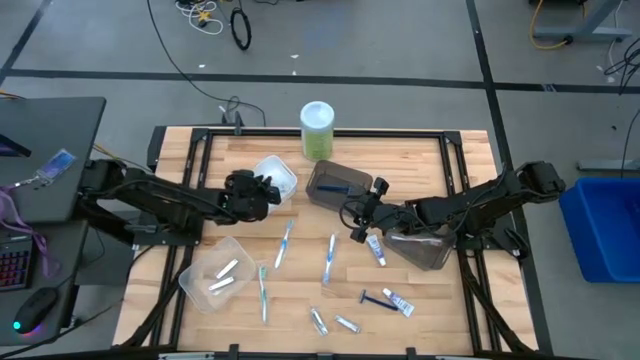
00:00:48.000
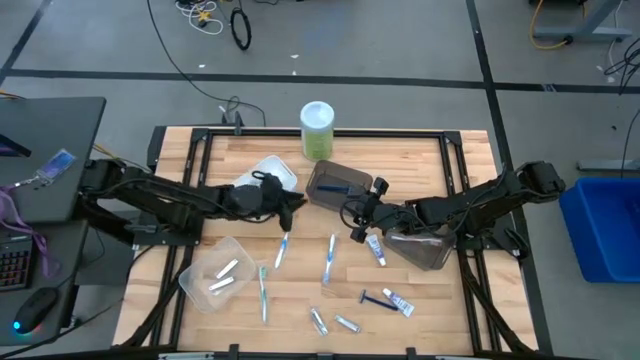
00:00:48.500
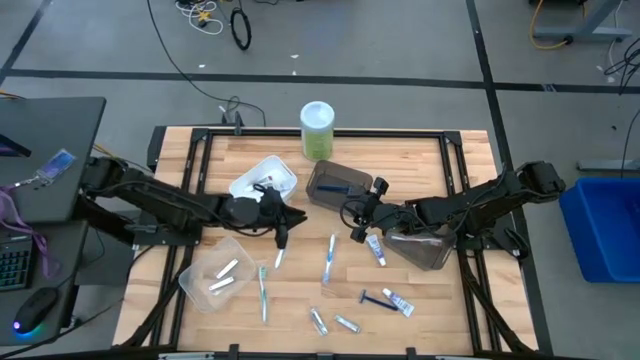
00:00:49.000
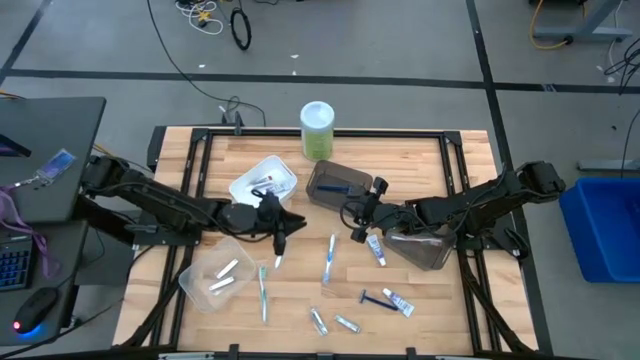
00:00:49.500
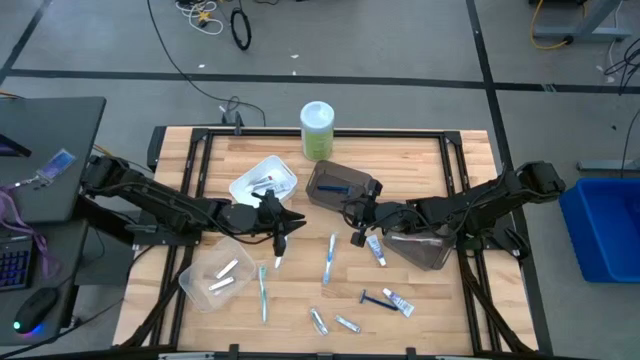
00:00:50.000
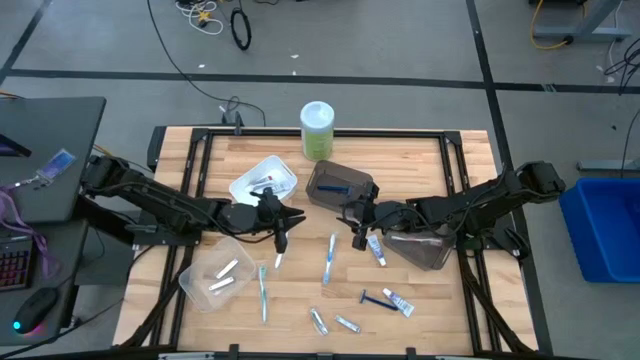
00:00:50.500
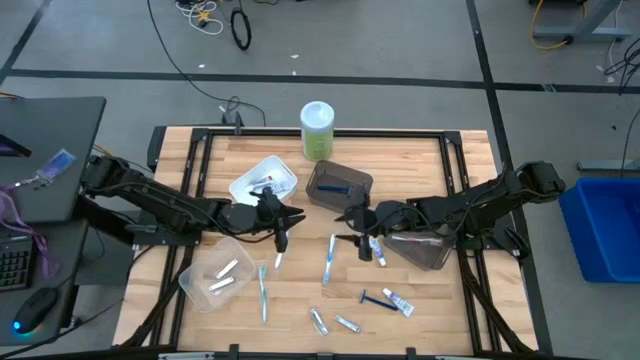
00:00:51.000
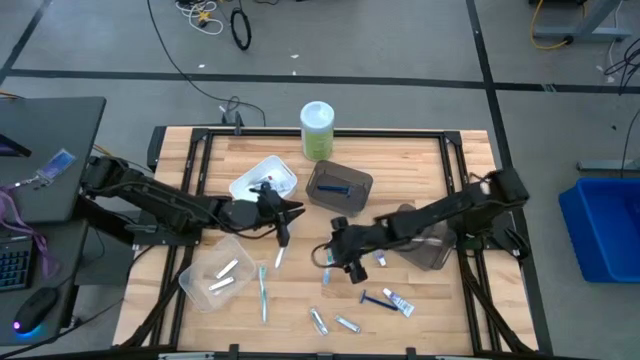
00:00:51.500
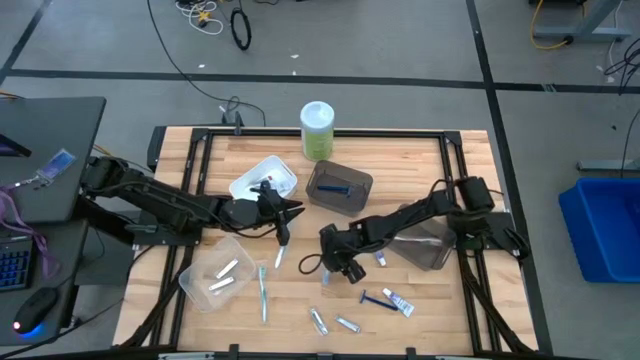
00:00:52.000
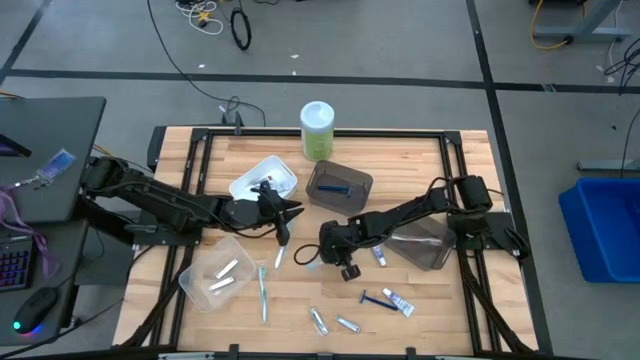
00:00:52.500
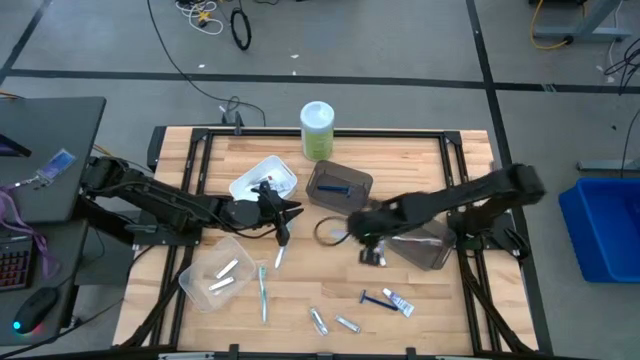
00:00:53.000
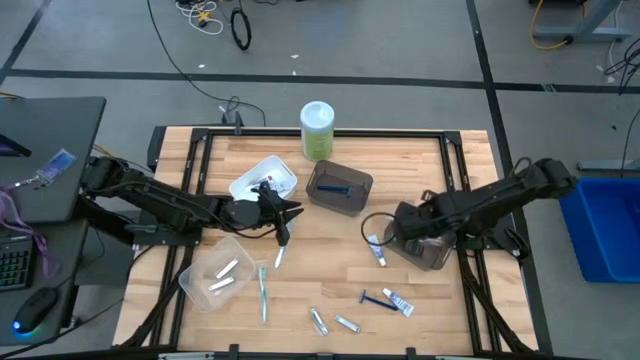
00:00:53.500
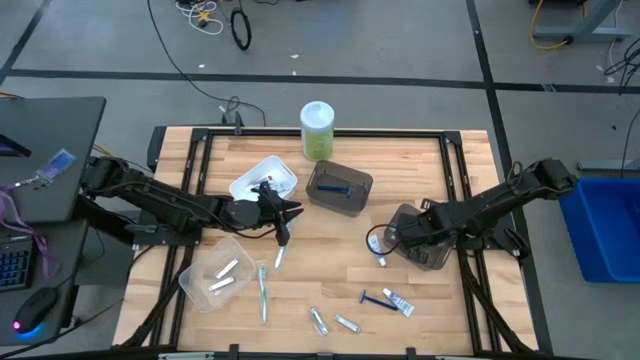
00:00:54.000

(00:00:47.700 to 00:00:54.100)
Task: Pick & Place Travel size toiletries
Put the blue toothbrush into the right black bin

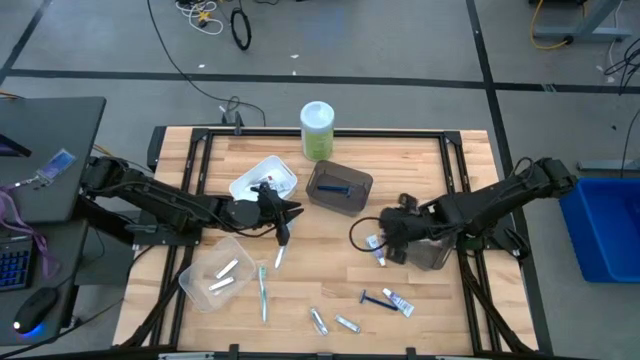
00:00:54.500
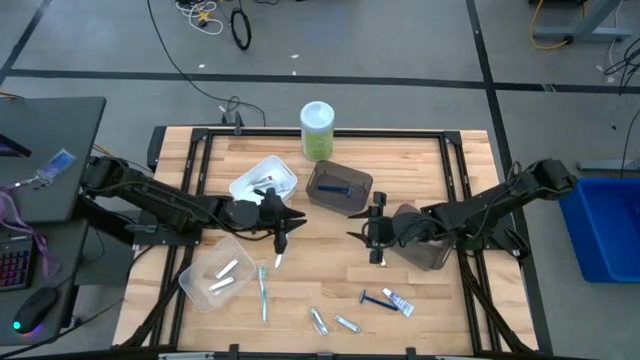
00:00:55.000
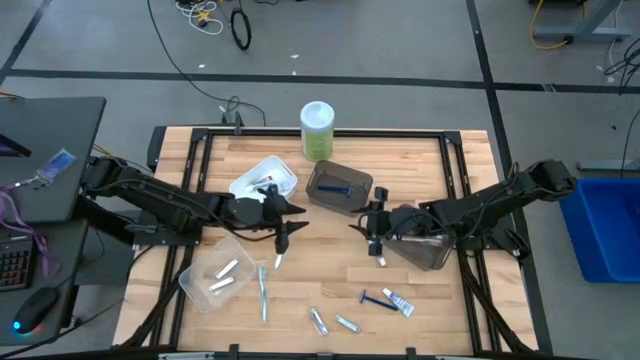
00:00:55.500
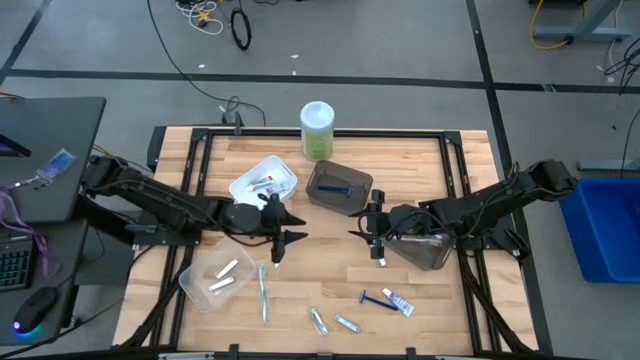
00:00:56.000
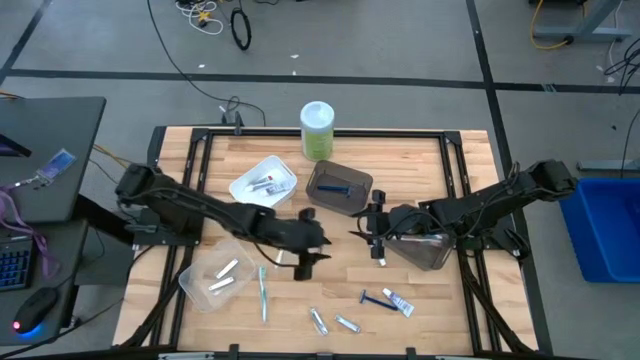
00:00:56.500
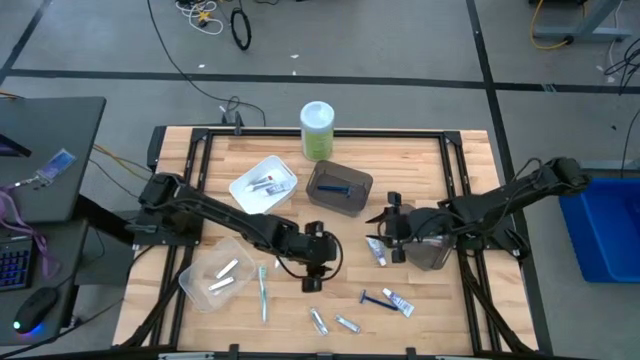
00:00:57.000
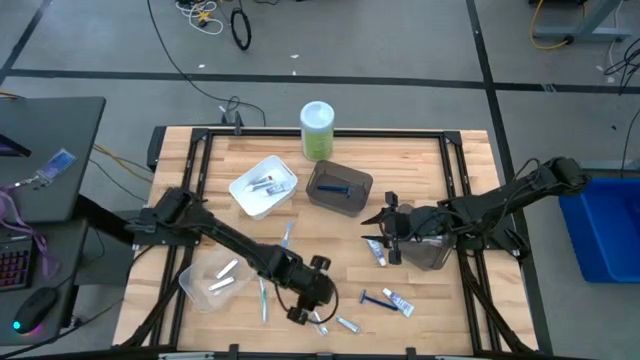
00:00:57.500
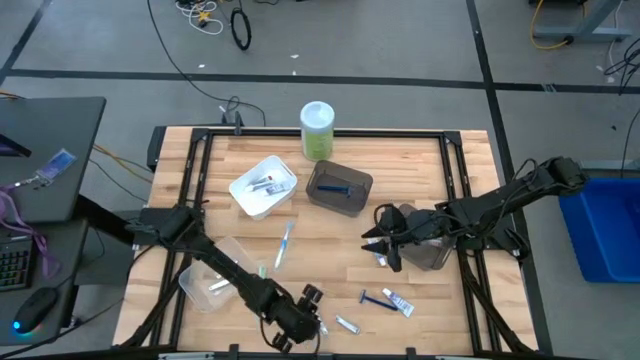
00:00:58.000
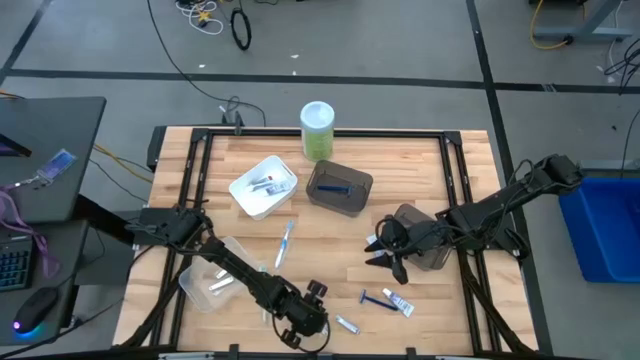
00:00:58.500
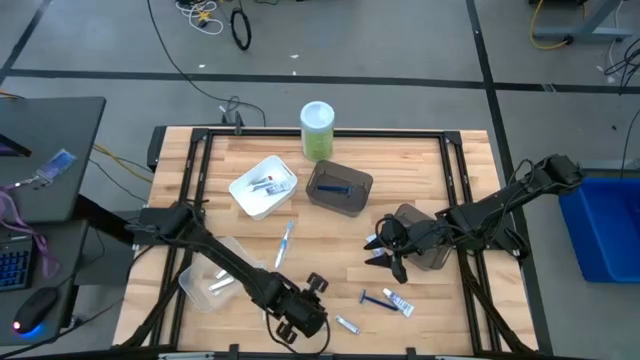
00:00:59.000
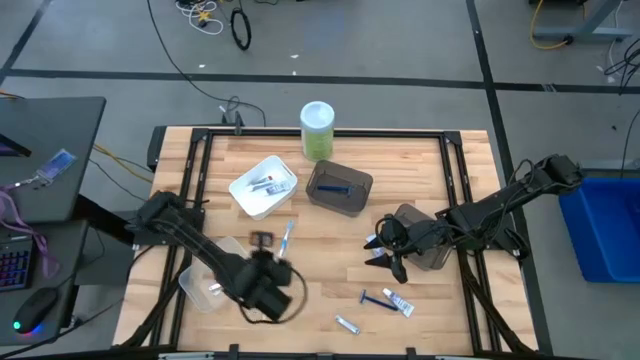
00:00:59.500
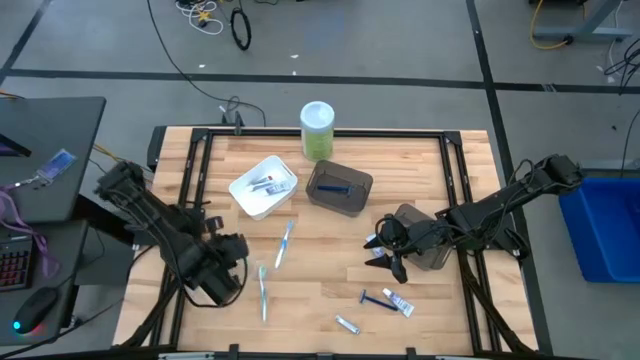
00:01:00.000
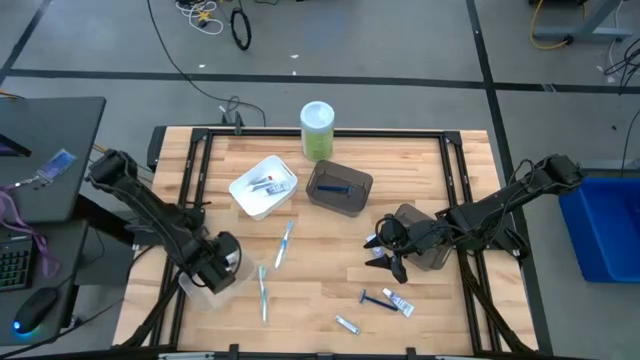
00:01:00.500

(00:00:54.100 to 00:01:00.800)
Put the nail cutter into the transparent bin

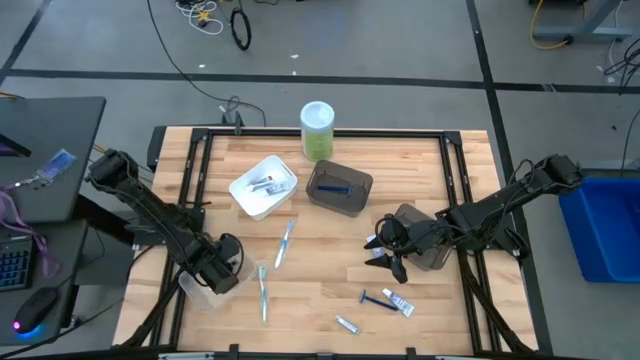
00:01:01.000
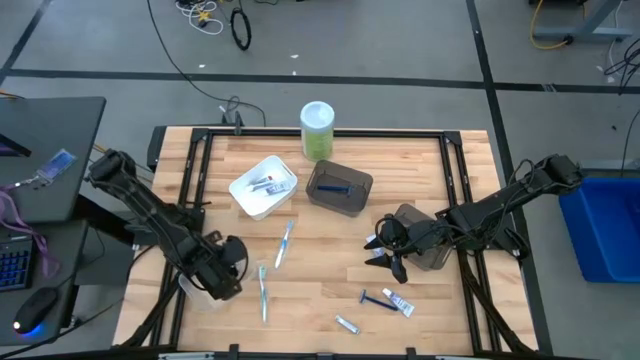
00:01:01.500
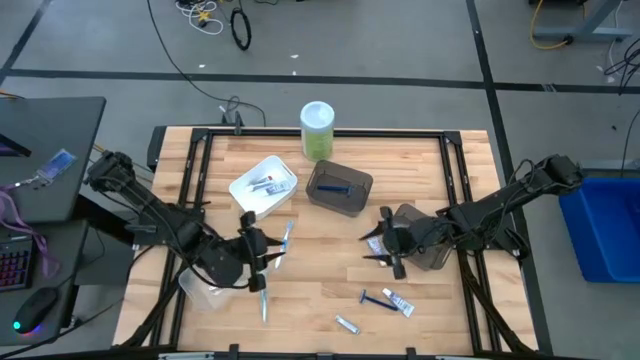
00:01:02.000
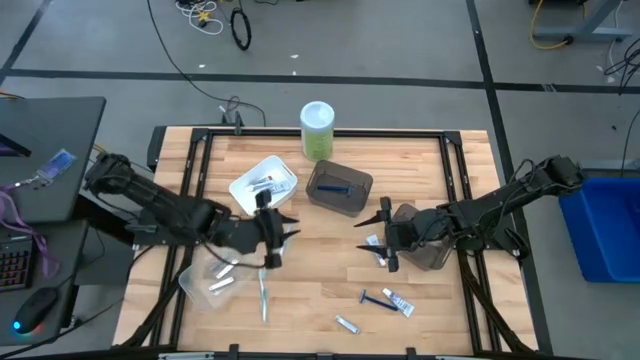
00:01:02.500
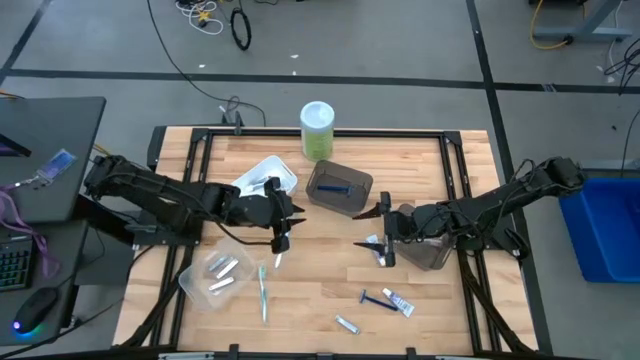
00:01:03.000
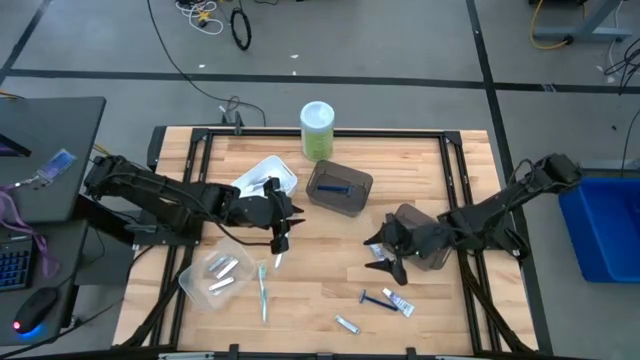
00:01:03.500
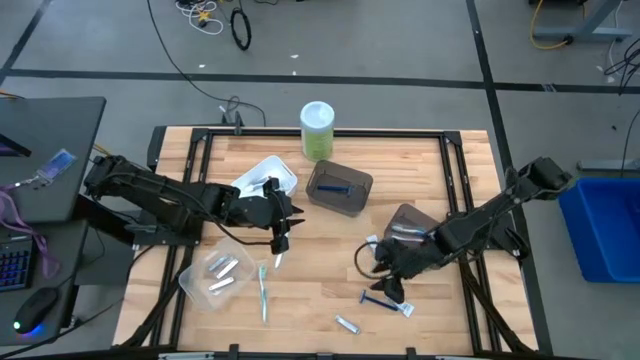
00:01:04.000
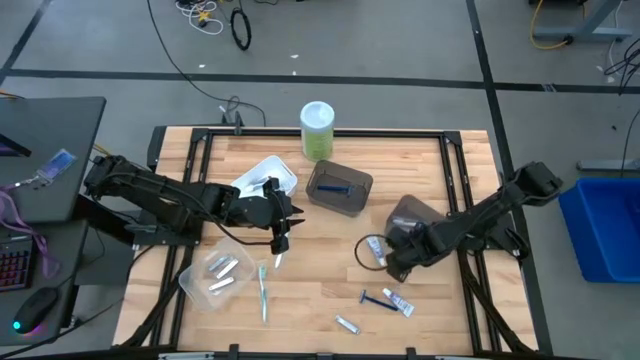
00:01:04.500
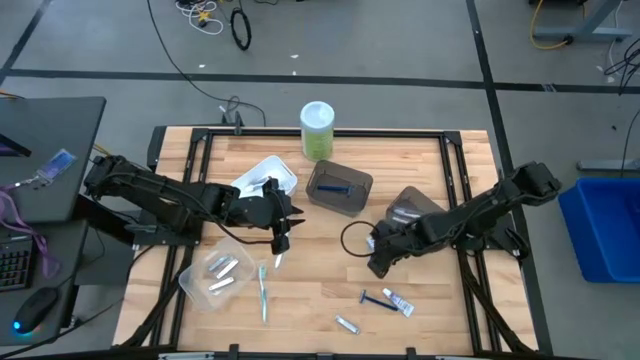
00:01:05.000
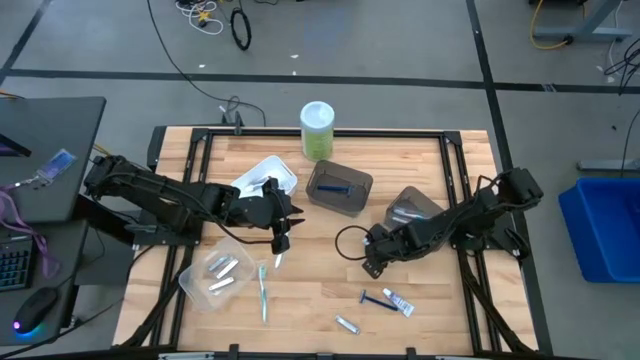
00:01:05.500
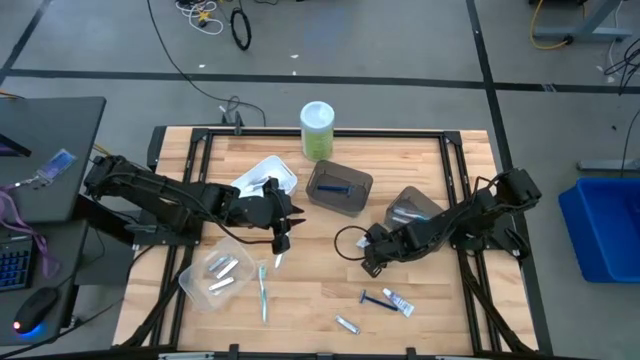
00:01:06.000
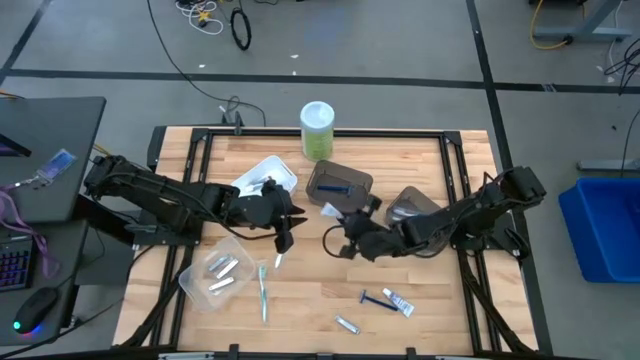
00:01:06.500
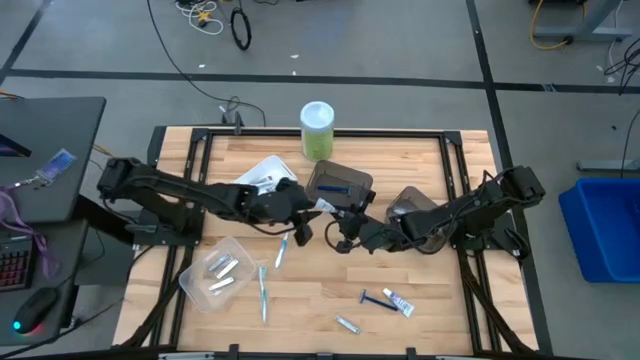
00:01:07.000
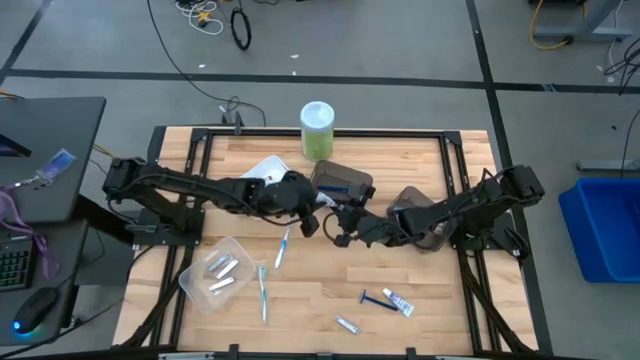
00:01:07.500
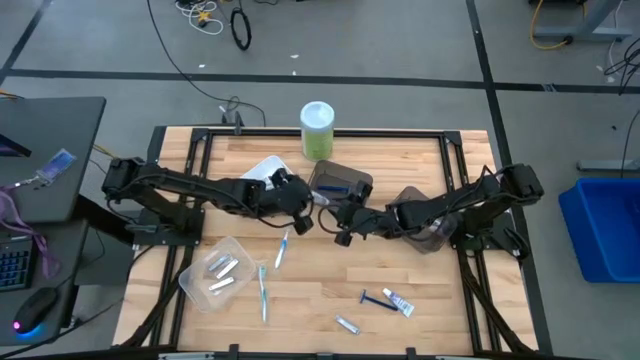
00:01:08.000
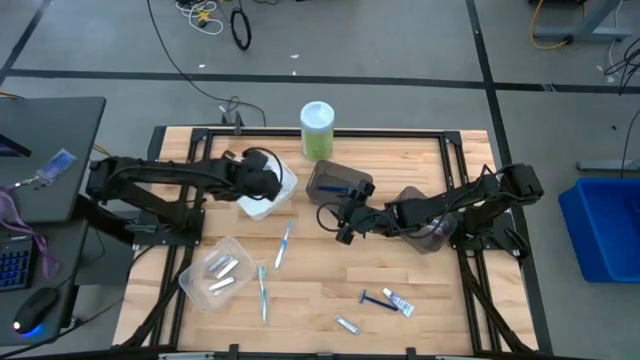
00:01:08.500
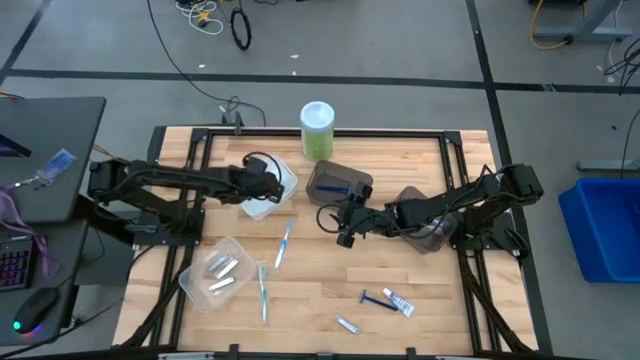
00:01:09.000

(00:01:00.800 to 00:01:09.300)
Put the toothpaste into the white bin
